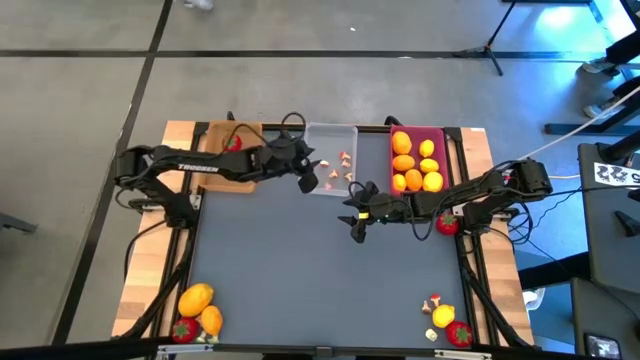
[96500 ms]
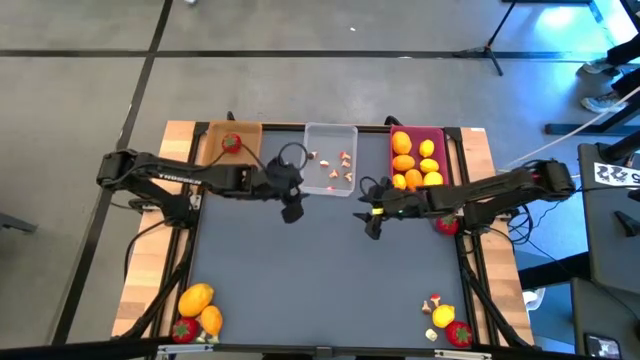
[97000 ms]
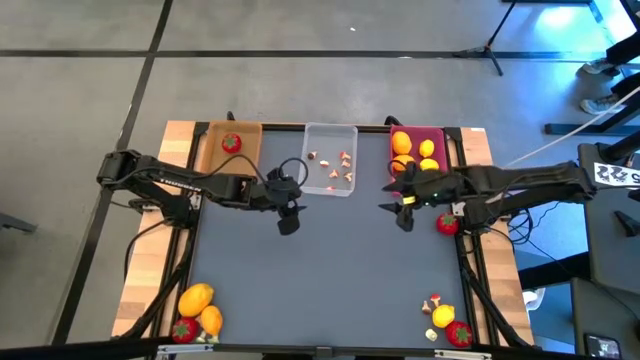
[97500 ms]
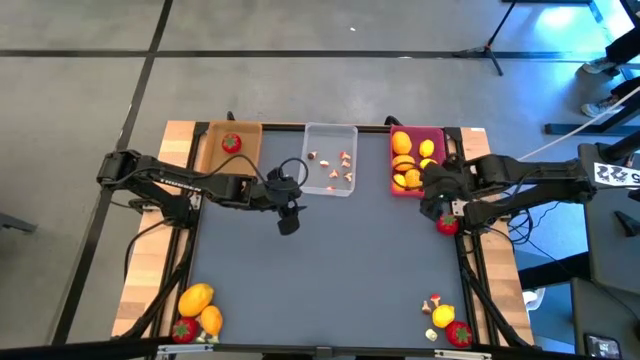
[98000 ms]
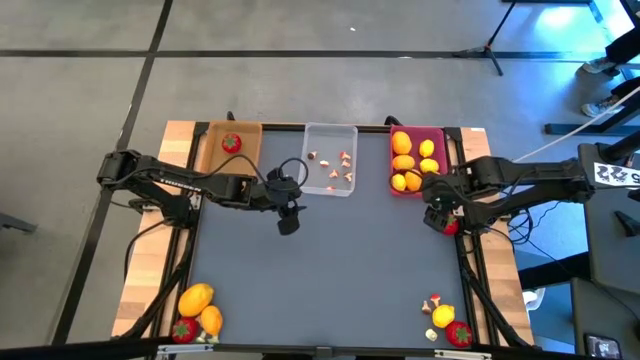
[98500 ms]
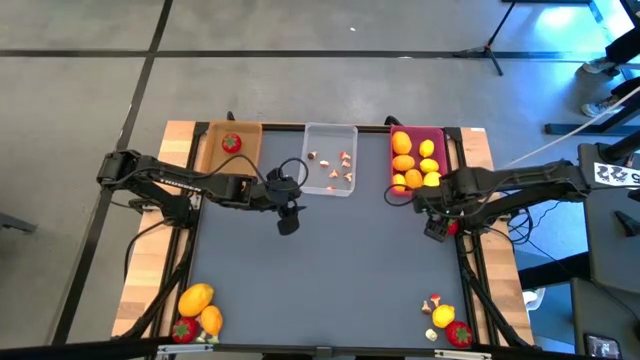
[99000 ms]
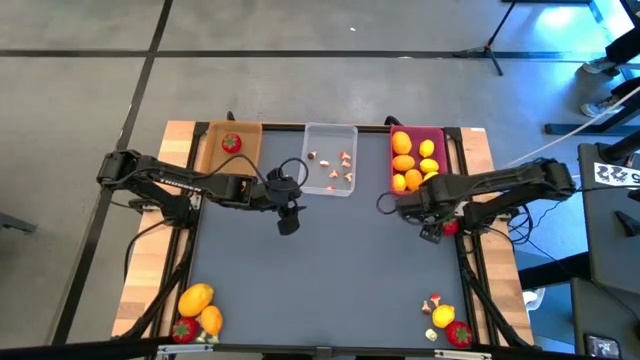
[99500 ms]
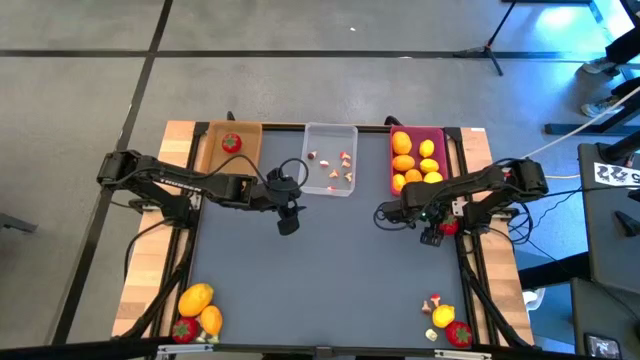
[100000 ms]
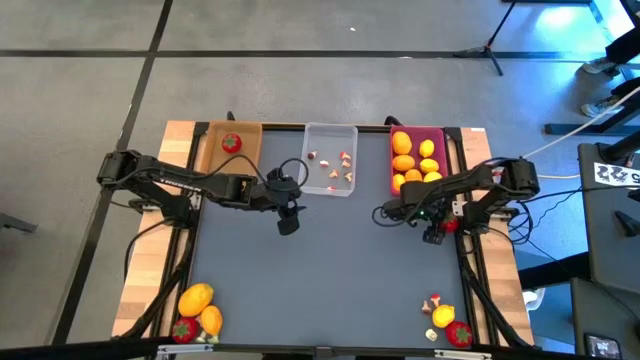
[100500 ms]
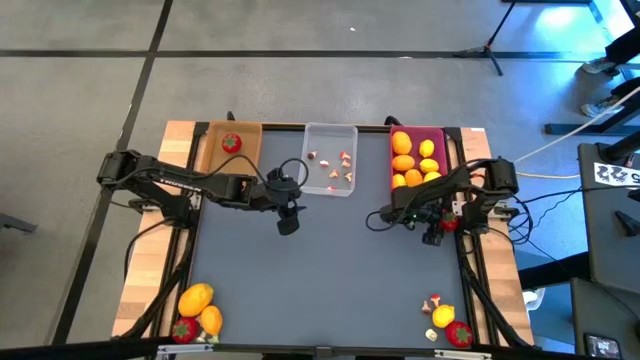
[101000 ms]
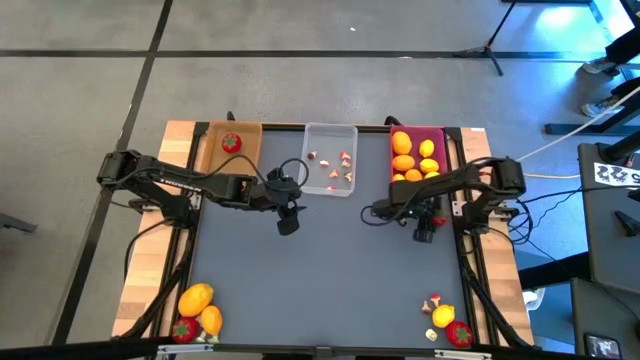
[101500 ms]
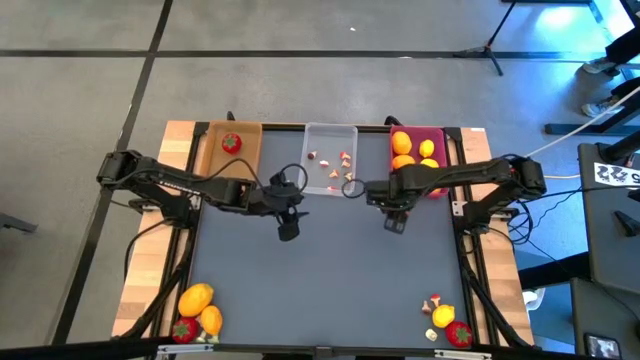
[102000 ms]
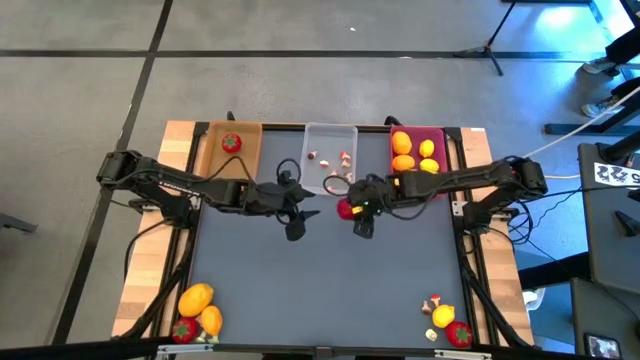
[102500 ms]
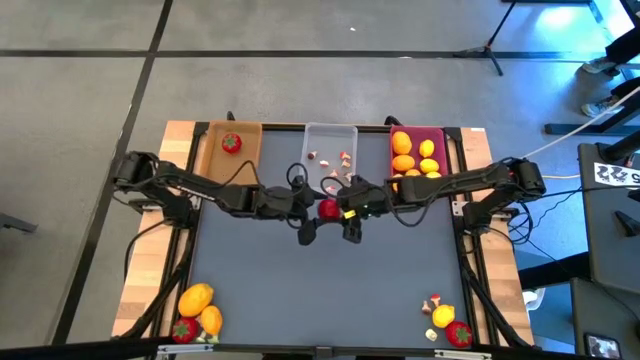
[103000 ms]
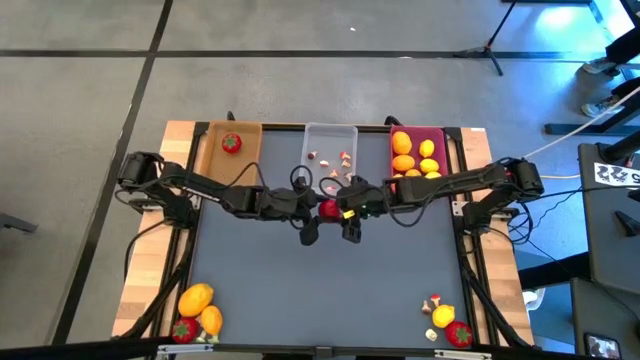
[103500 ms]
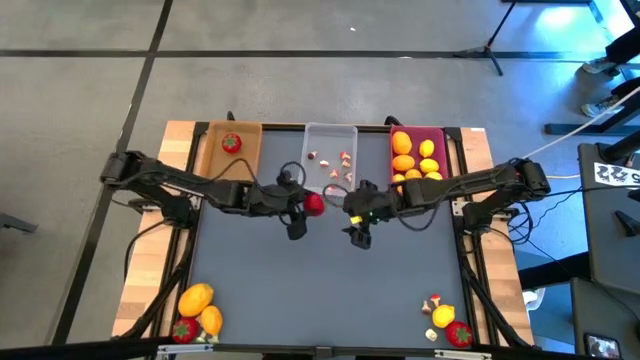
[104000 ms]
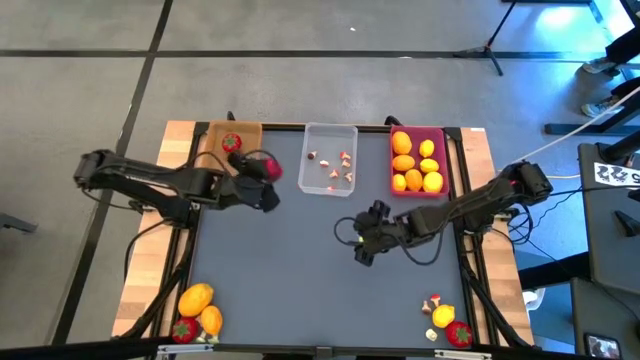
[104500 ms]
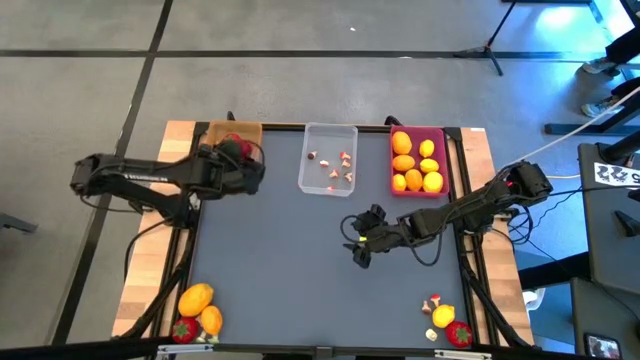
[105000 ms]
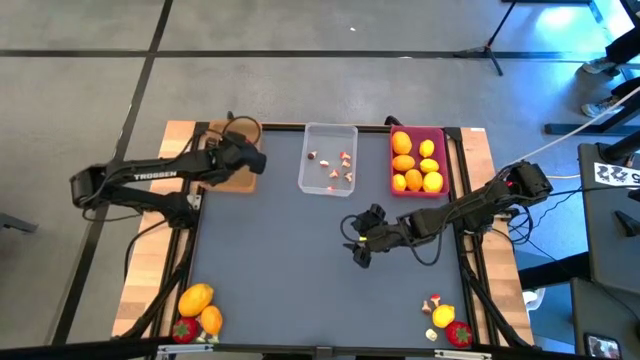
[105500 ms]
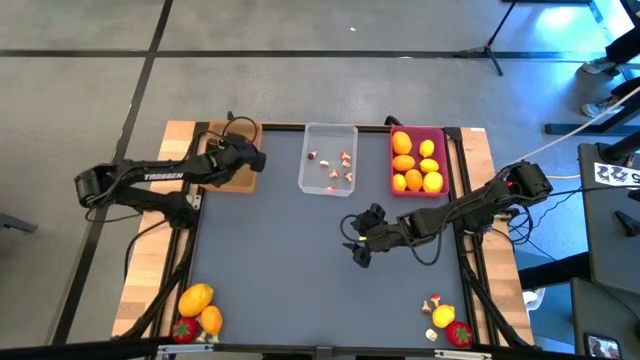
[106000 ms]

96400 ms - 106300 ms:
Task: Sort produce into baskets
Put the tomato into the orange bin

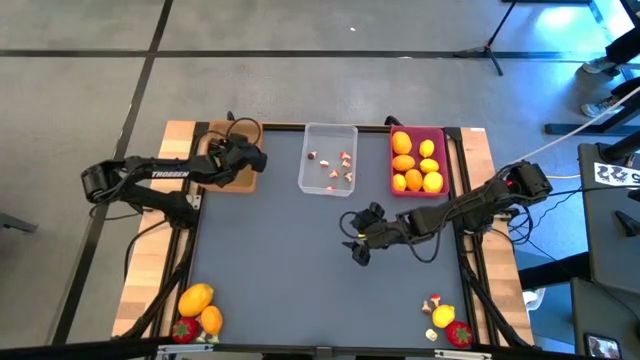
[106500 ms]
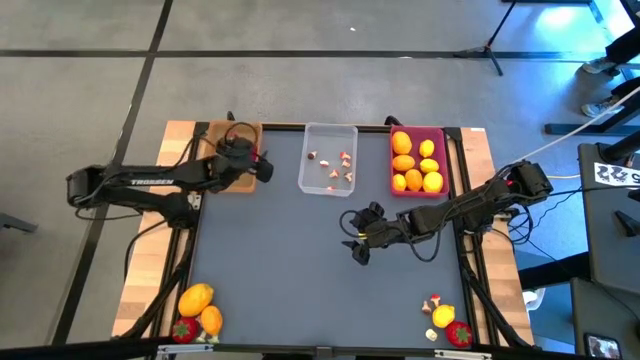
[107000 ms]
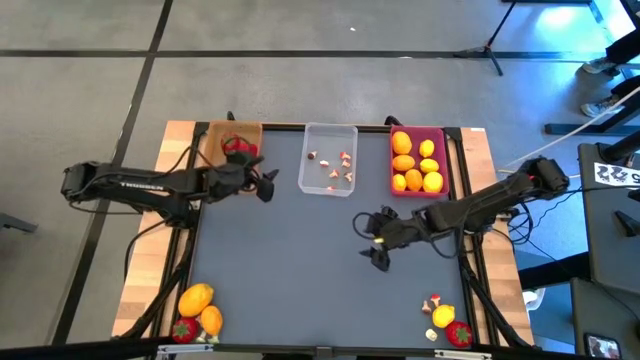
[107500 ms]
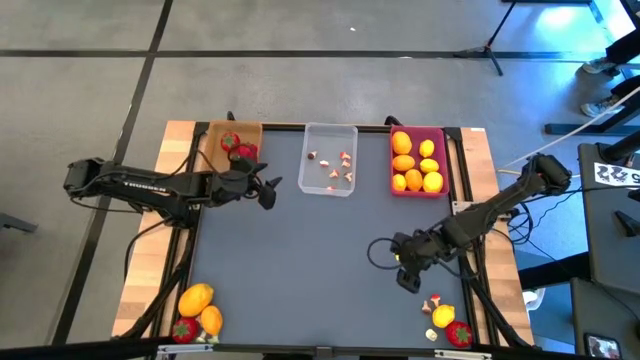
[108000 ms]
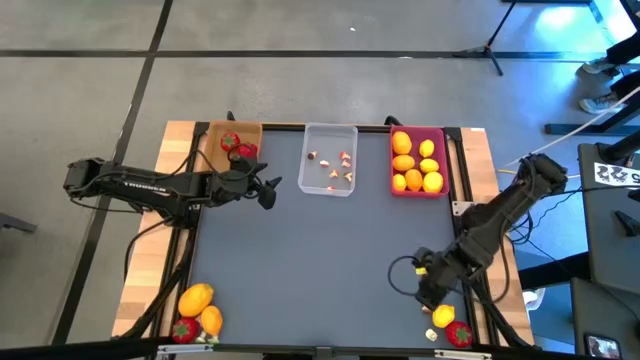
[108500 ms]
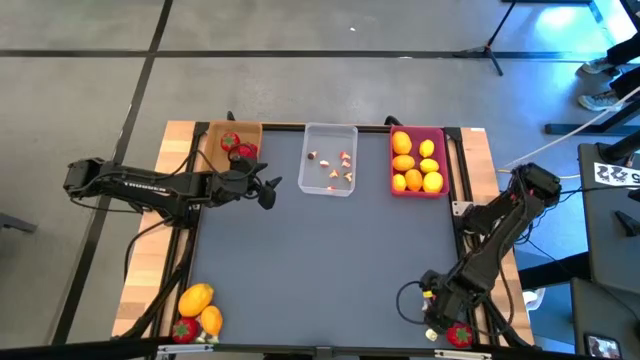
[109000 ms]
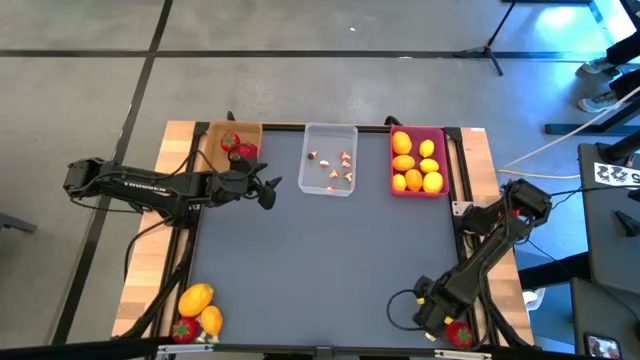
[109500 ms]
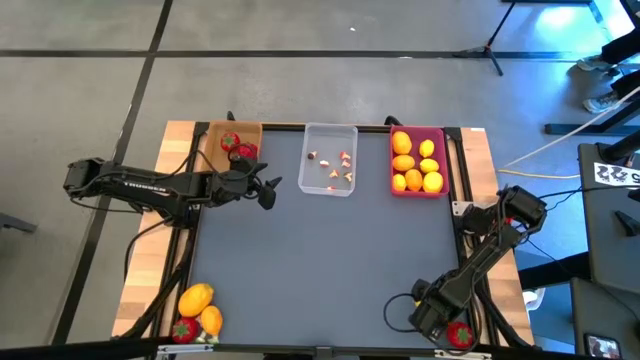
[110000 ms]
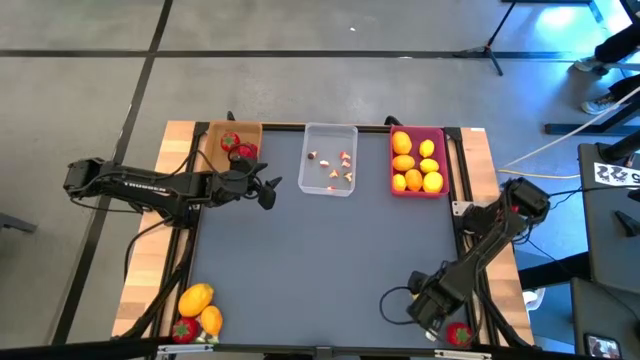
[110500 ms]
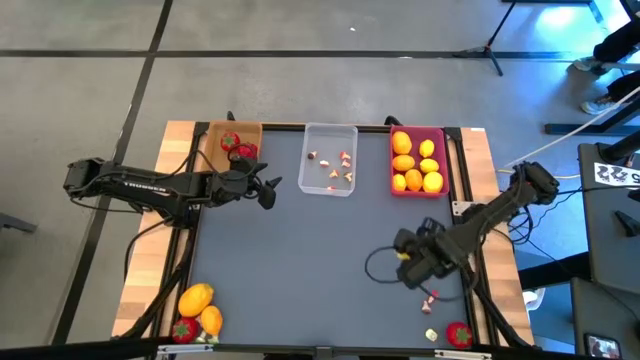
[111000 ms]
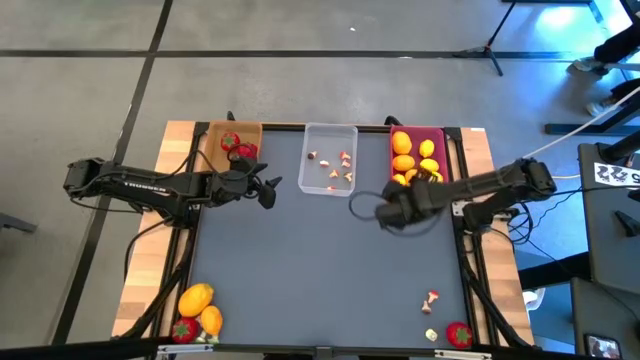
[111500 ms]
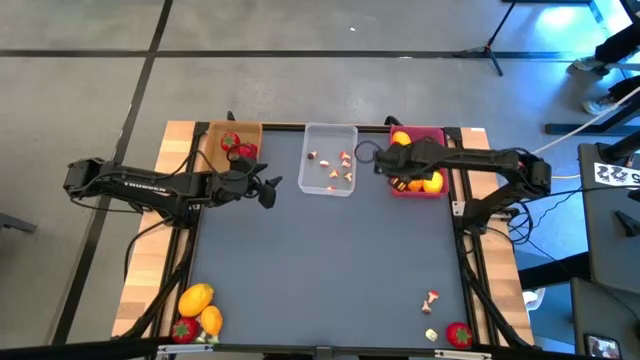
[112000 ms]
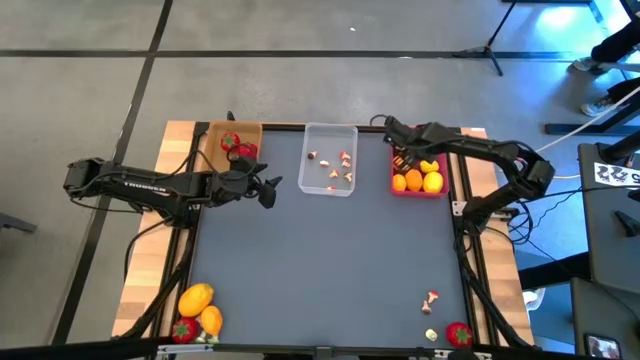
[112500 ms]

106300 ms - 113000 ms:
Put the lemon into the pink bin

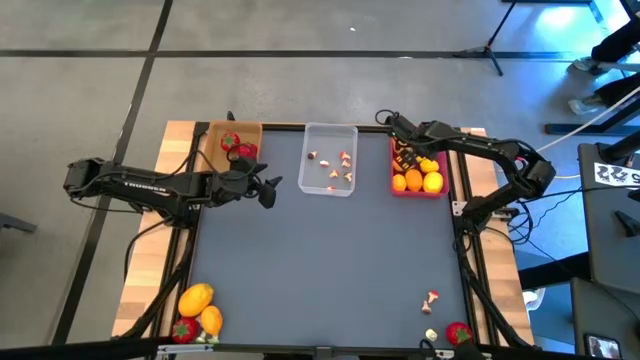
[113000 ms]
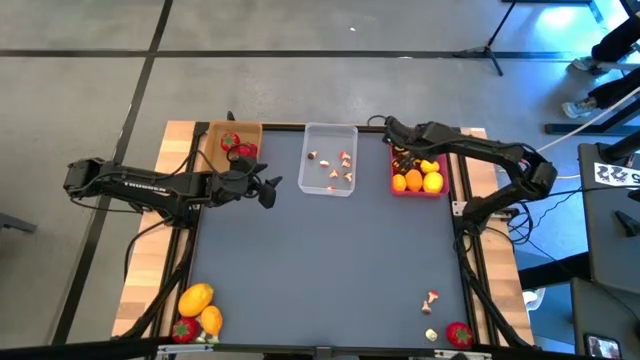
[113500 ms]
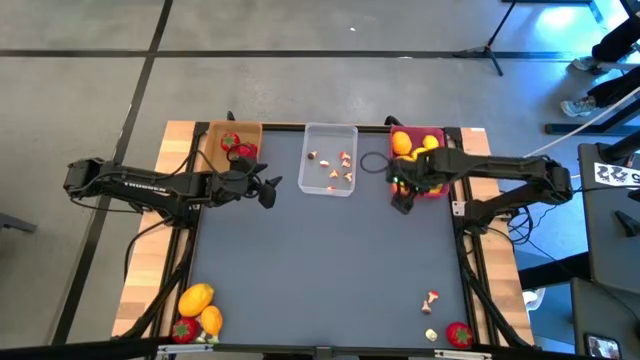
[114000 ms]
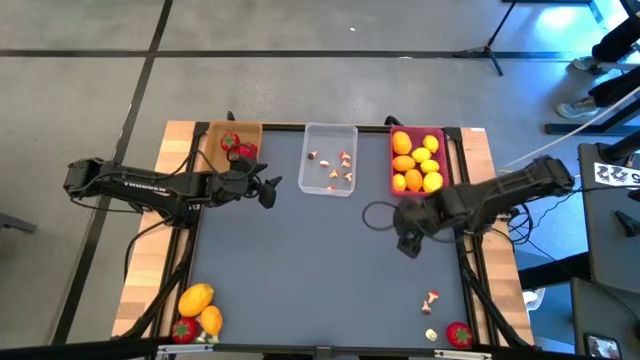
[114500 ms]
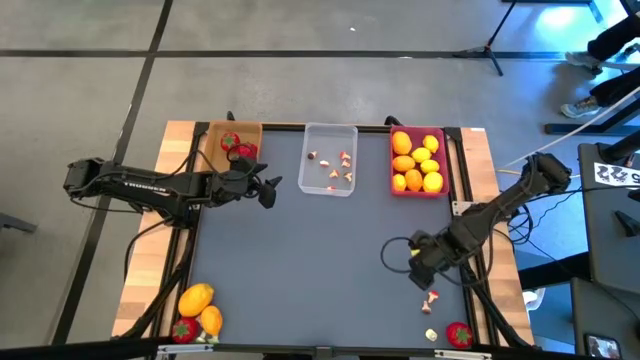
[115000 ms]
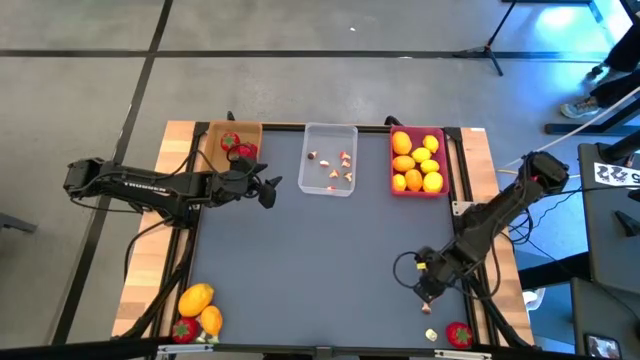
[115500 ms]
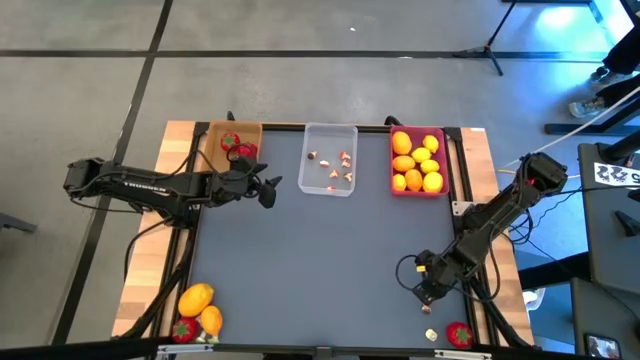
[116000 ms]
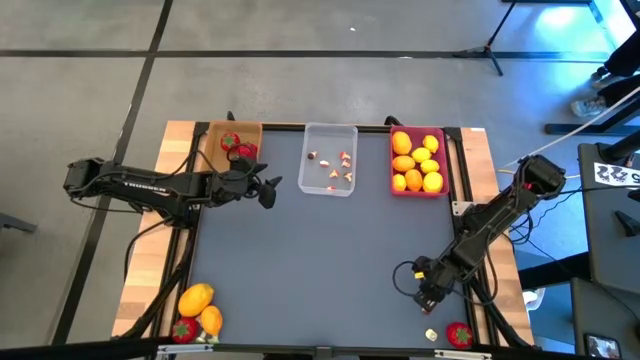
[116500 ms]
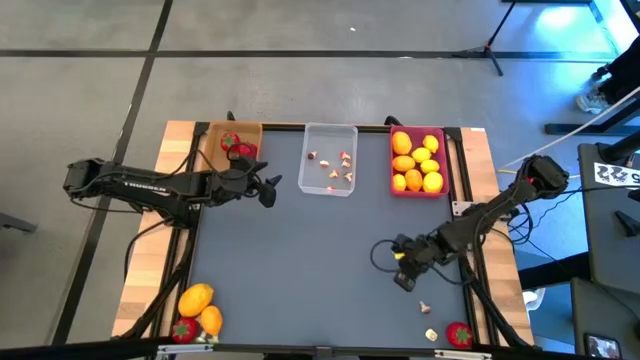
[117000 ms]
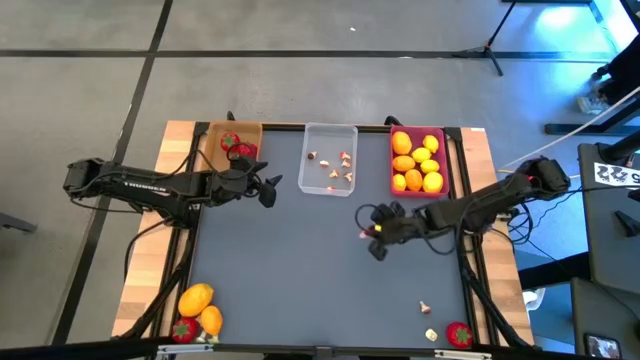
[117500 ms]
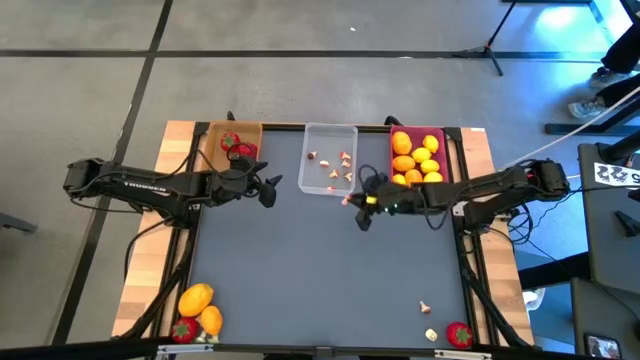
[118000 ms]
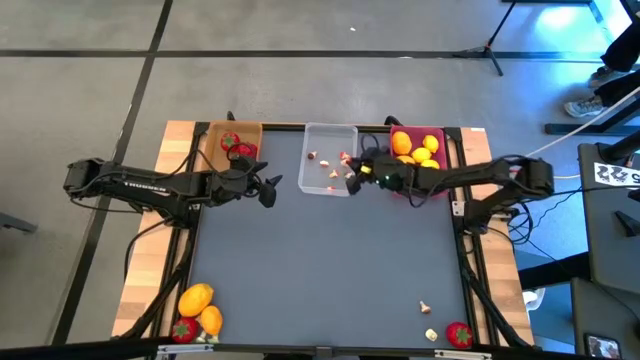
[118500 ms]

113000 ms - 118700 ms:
Put the mushroom into the transparent bin
